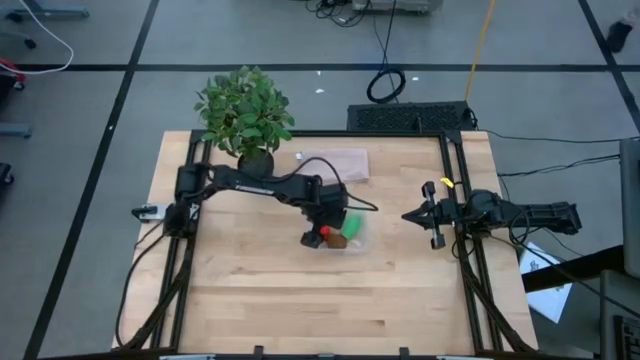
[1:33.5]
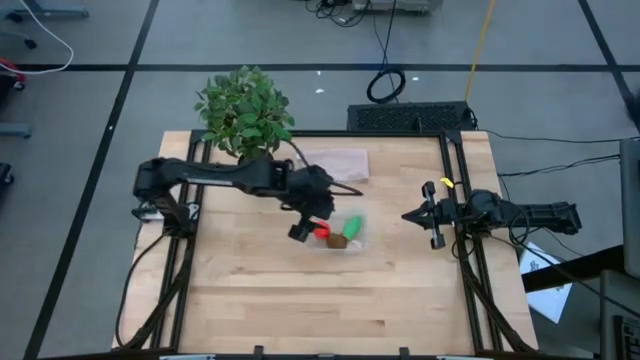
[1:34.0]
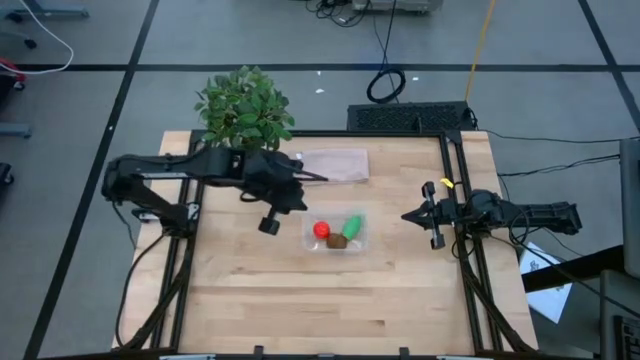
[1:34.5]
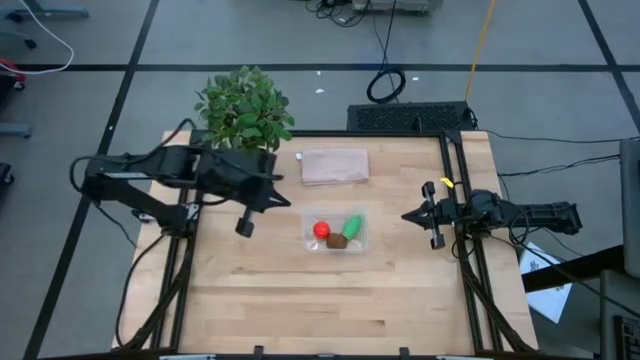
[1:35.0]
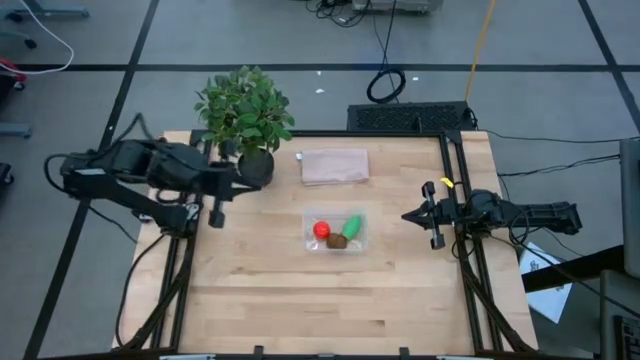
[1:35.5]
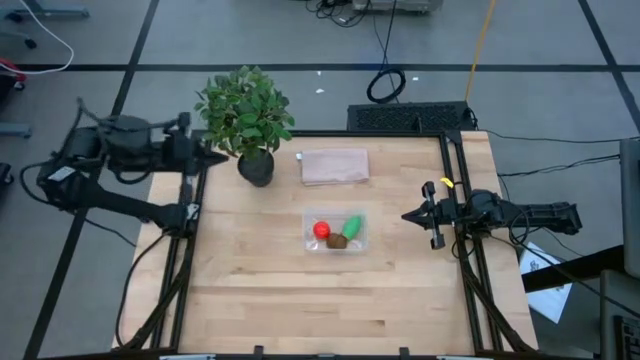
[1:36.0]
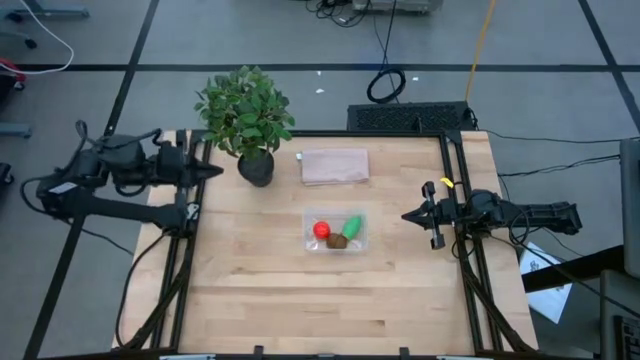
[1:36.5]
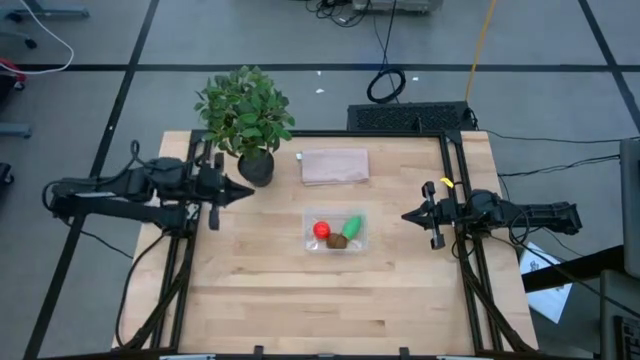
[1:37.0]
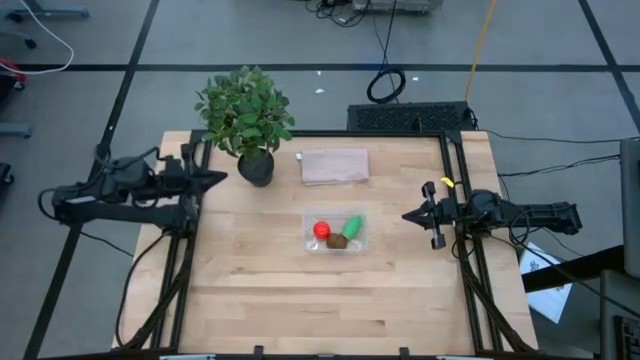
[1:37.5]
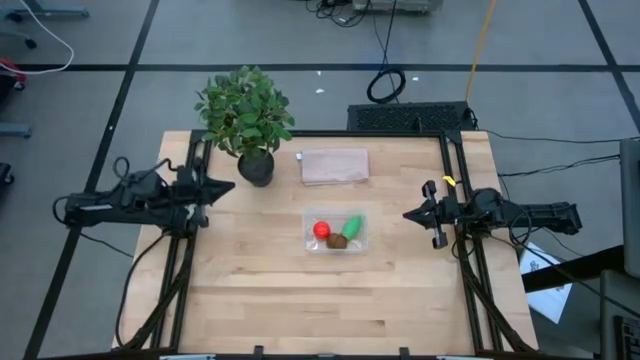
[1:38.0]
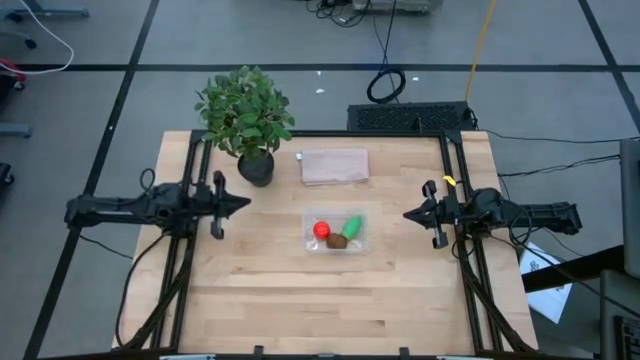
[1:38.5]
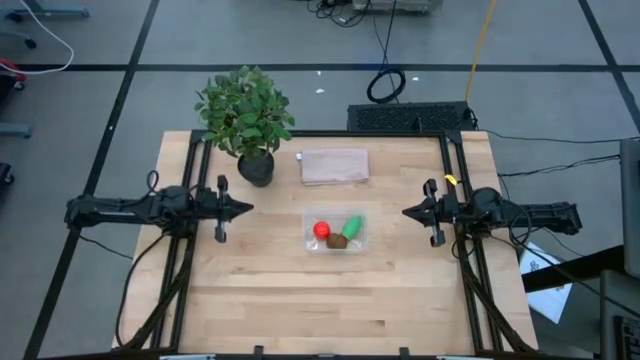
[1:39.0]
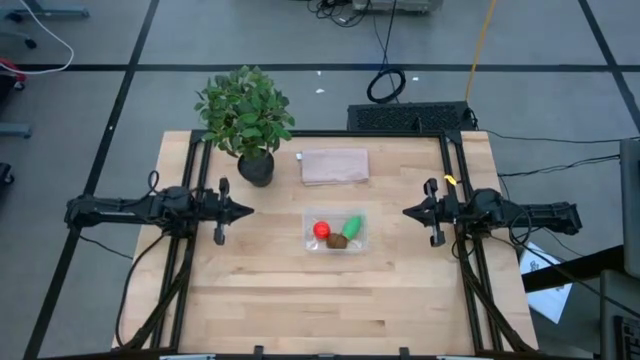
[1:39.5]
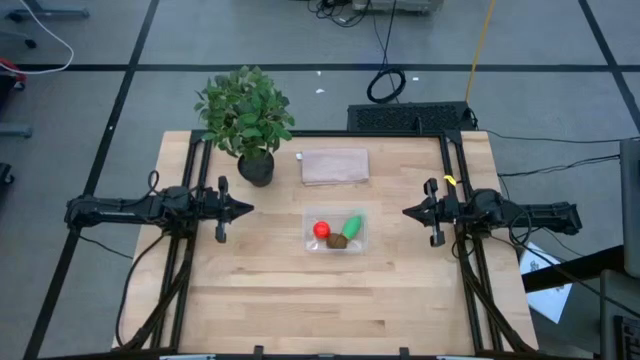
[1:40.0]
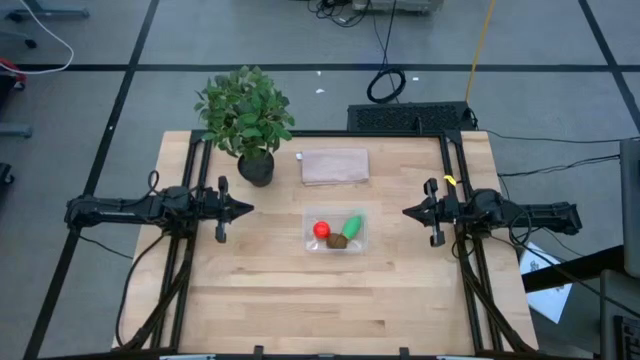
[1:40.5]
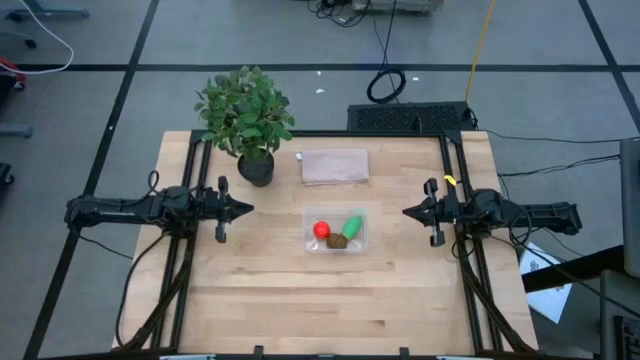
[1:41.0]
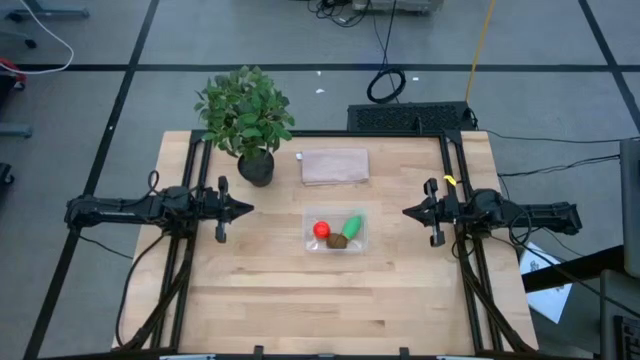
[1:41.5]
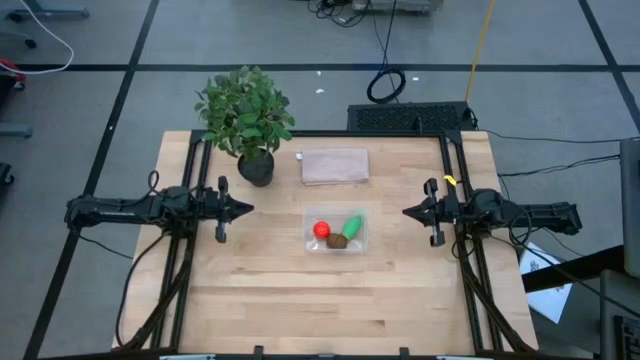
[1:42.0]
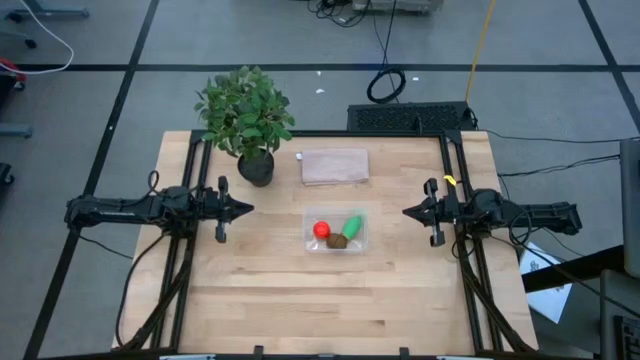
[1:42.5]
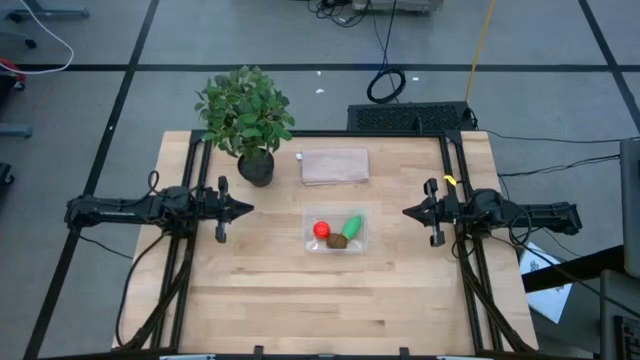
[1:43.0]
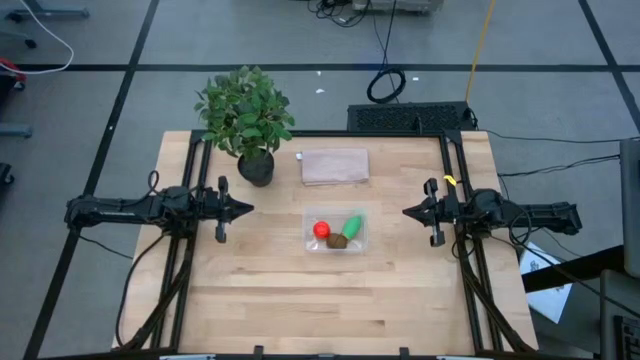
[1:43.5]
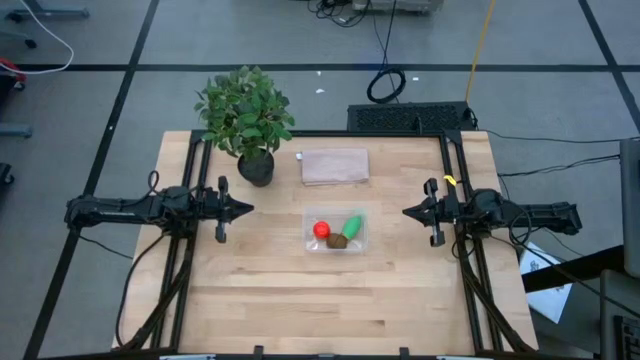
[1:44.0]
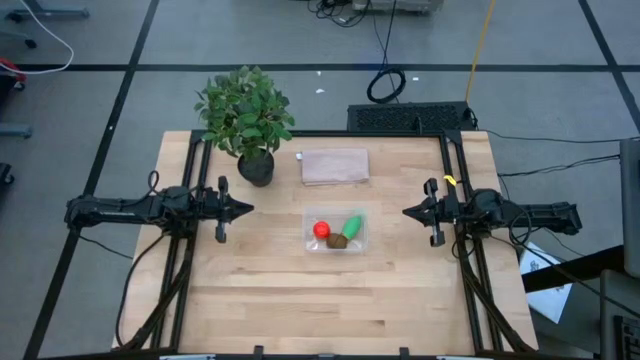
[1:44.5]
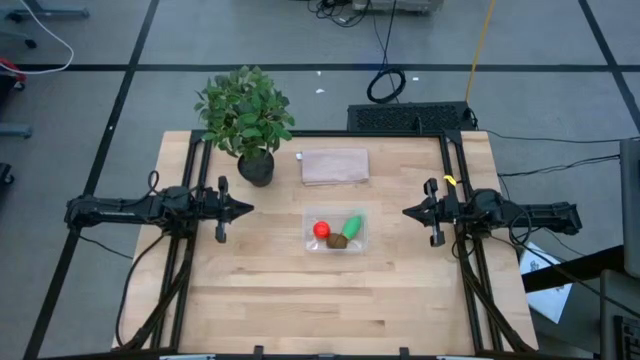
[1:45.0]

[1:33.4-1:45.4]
Task: Pick and placing Produce into tupperware
Return to Home Position

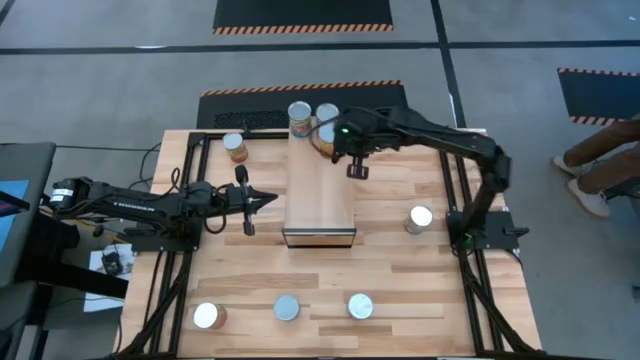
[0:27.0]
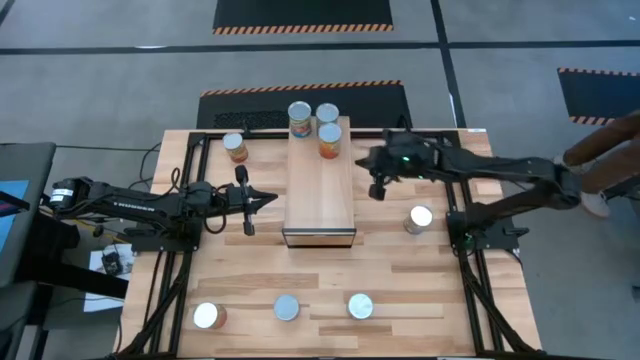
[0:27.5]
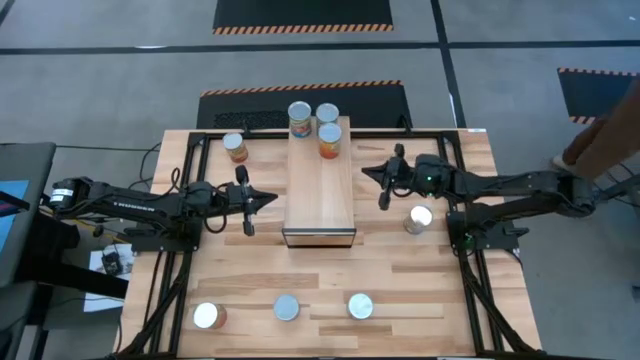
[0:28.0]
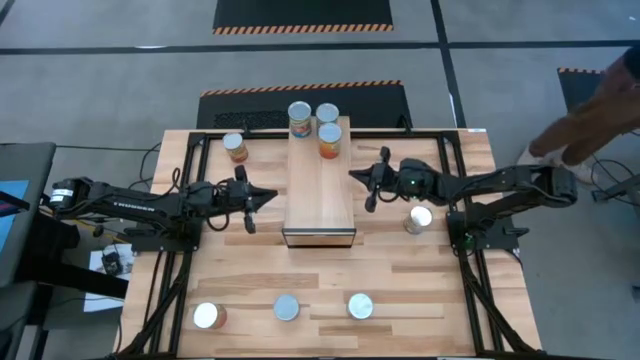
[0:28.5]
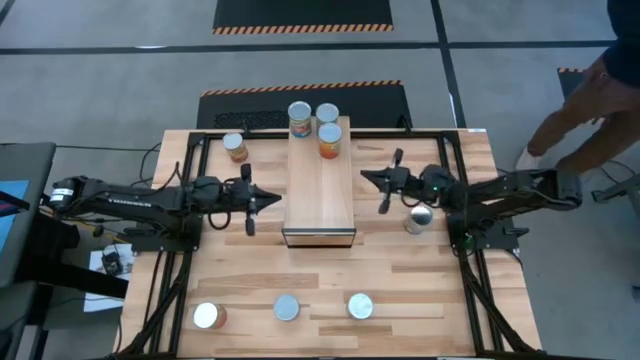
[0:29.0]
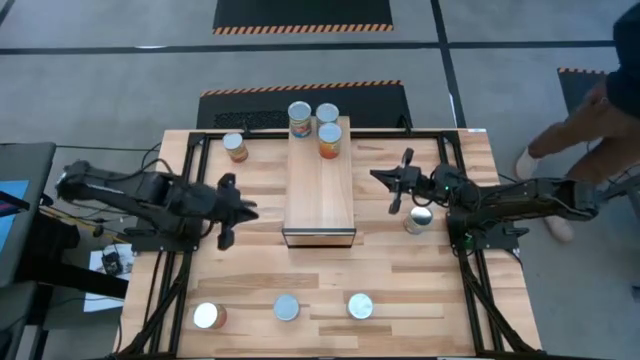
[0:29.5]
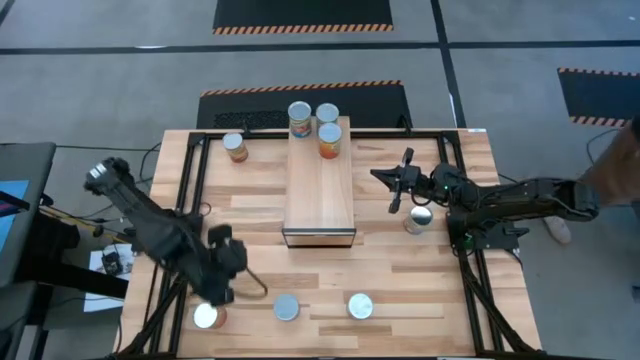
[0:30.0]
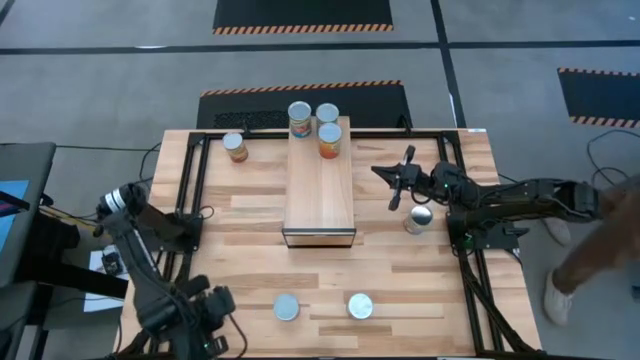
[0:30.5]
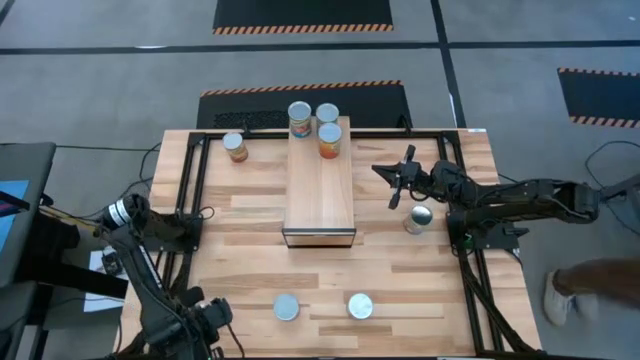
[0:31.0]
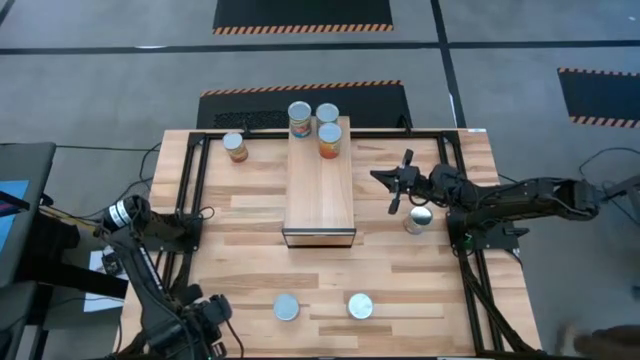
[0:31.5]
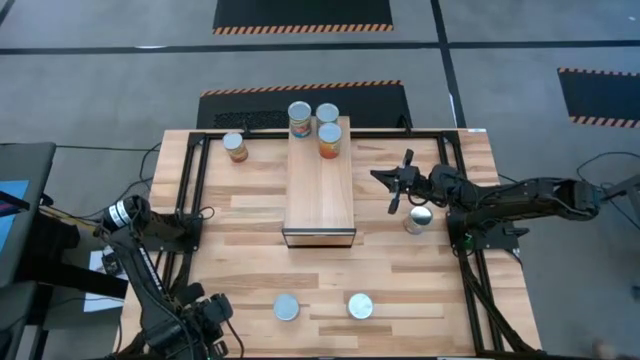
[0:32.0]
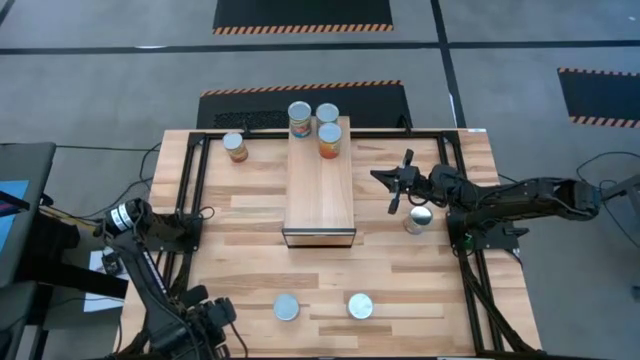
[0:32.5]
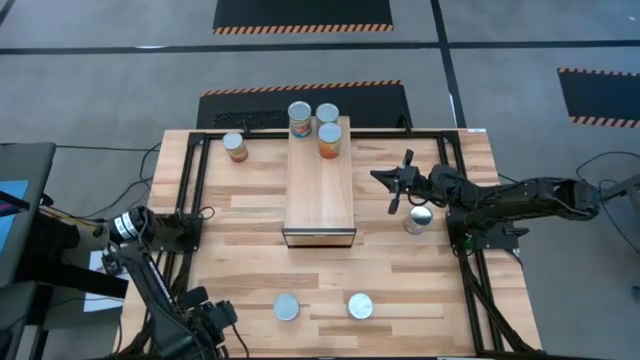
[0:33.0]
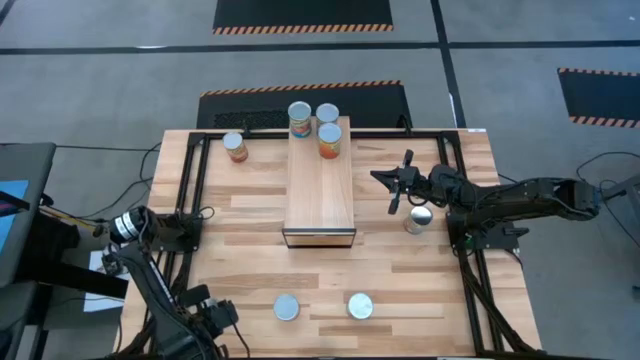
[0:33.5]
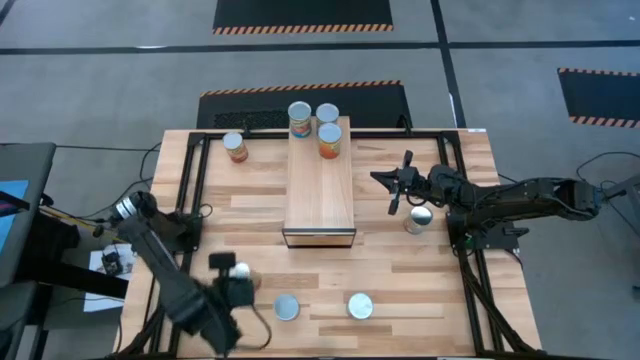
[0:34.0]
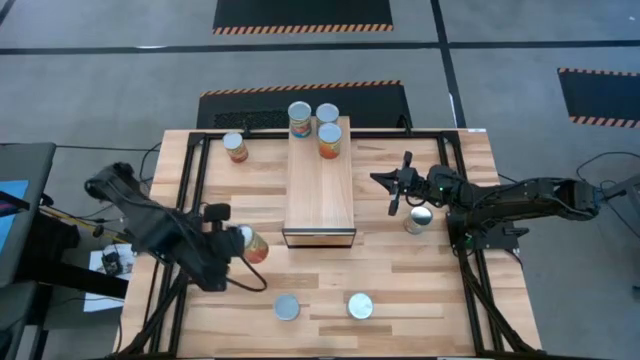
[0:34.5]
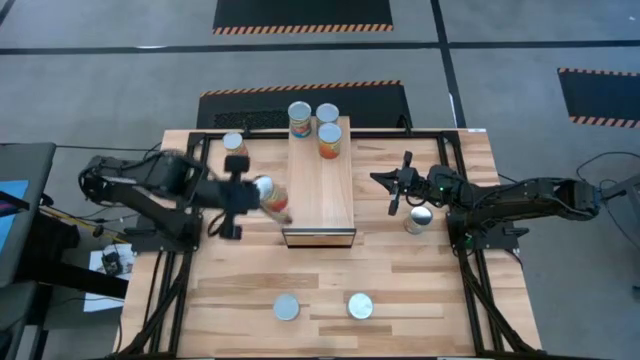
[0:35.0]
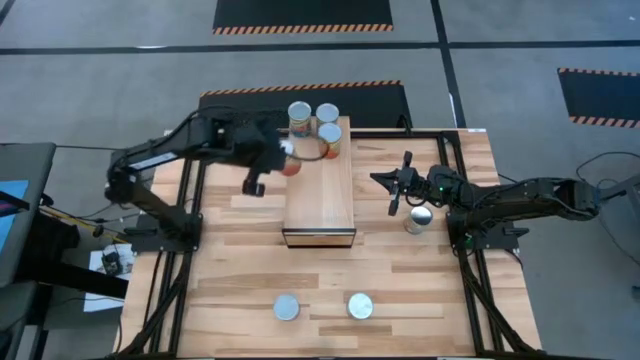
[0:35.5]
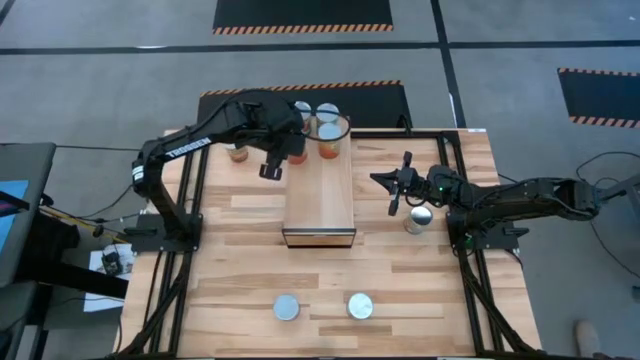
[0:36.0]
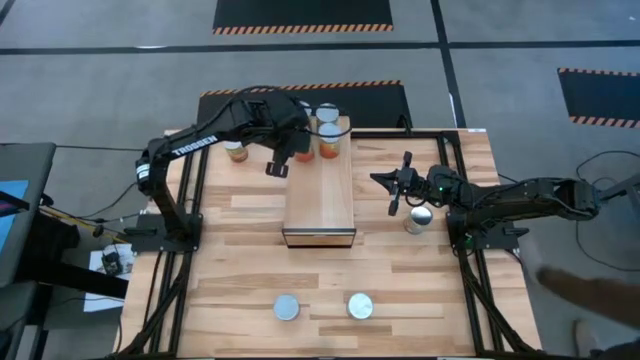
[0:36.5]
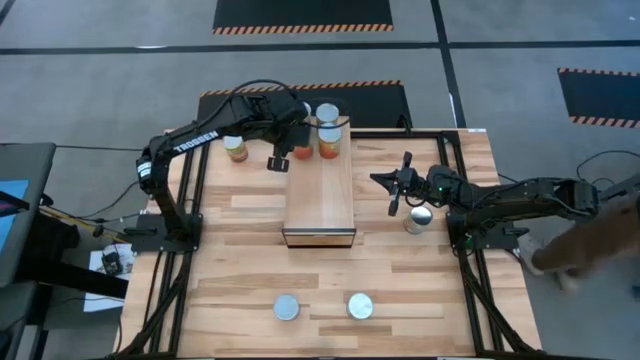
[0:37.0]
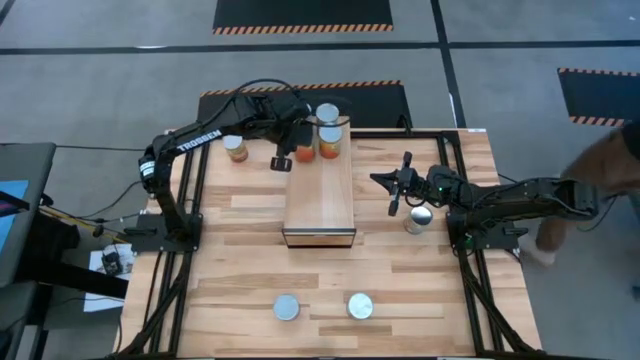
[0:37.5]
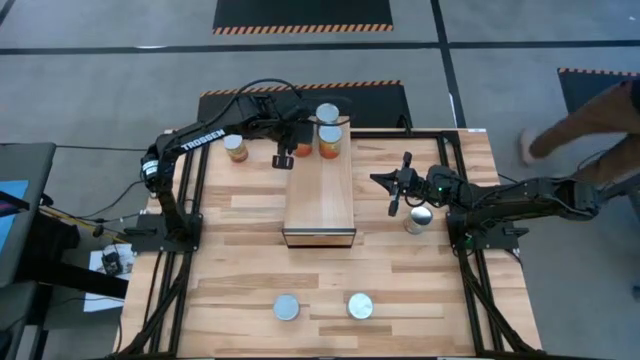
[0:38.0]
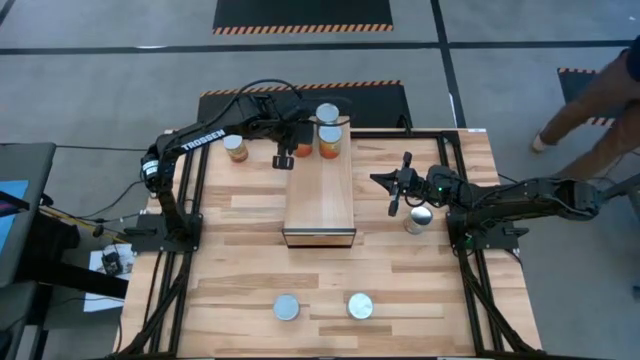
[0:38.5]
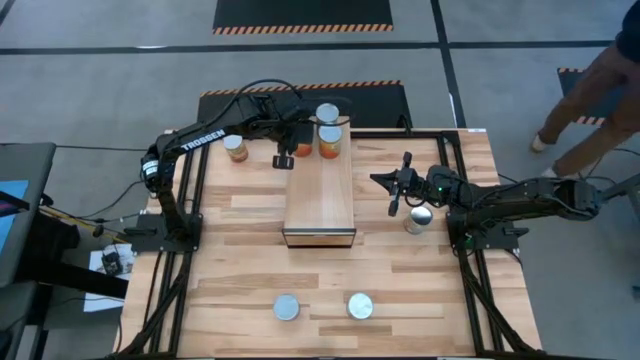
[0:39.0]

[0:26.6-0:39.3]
Task: Pick and place cans onto a shelf
Put the canned green beans on the shelf aligned with other canned green beans
